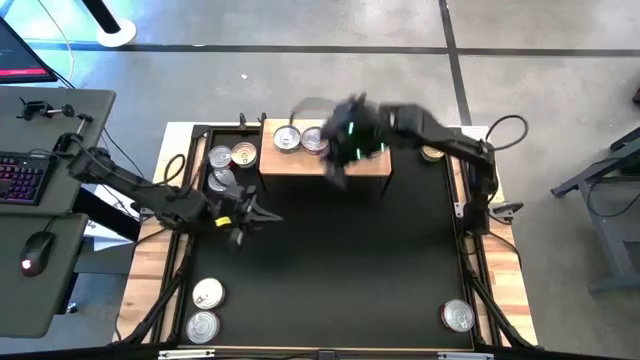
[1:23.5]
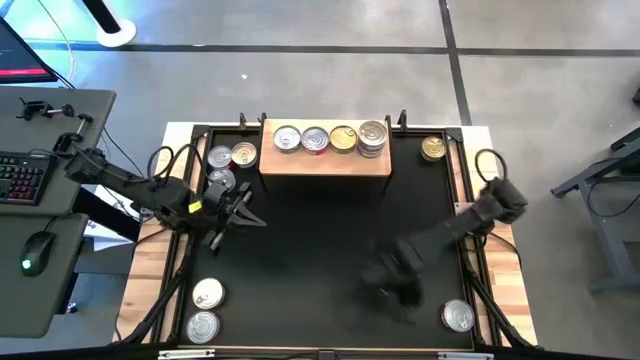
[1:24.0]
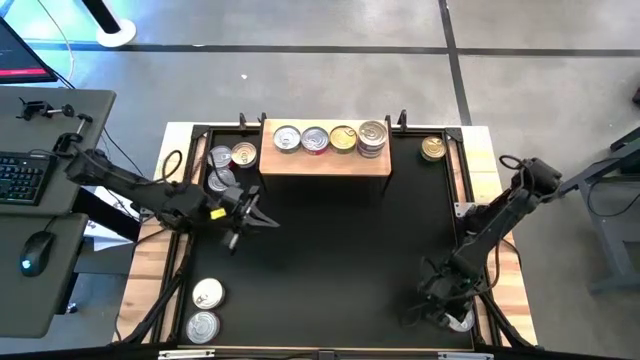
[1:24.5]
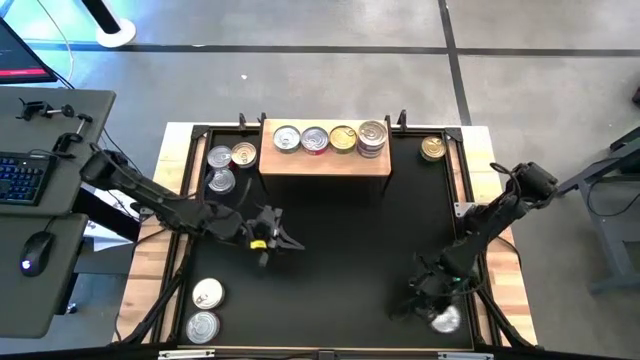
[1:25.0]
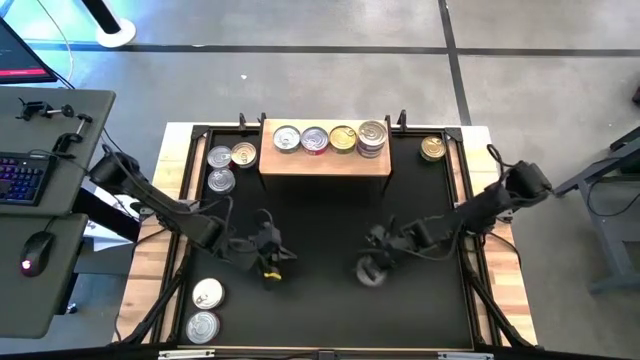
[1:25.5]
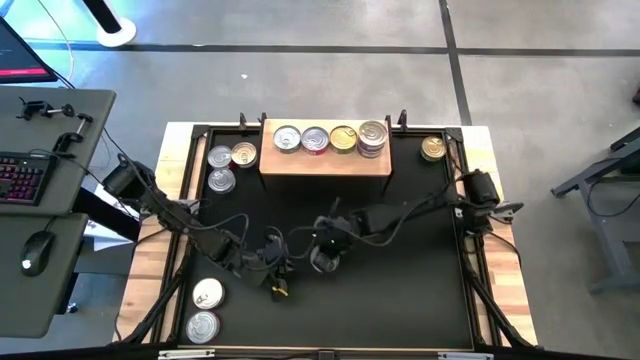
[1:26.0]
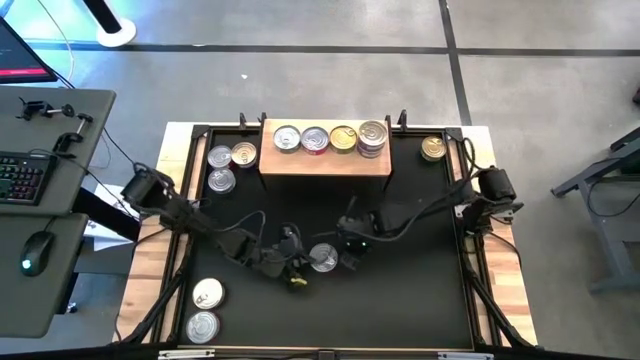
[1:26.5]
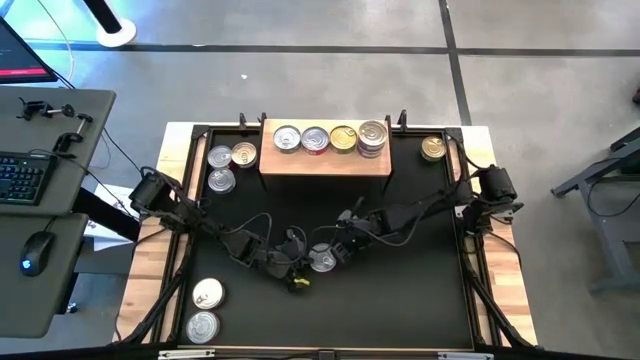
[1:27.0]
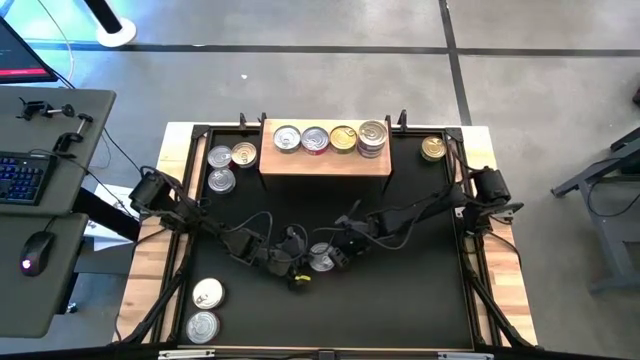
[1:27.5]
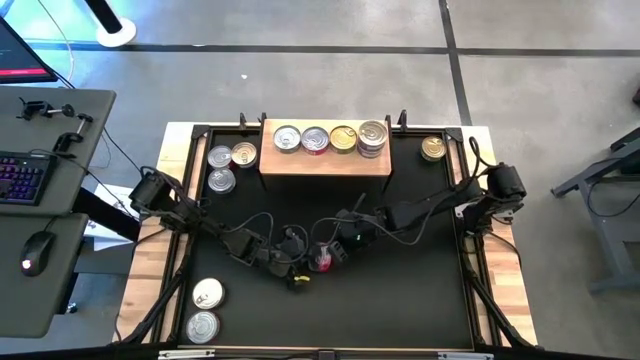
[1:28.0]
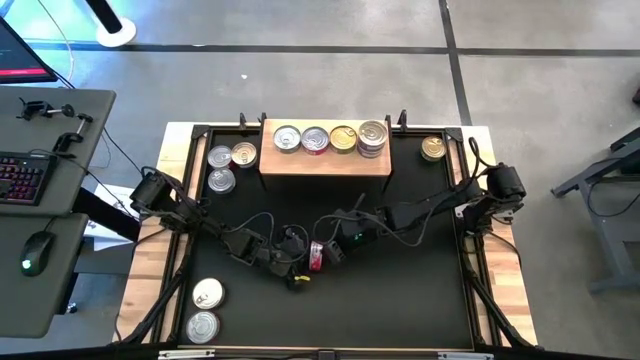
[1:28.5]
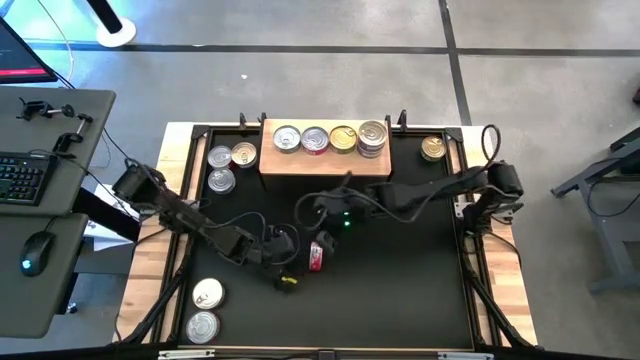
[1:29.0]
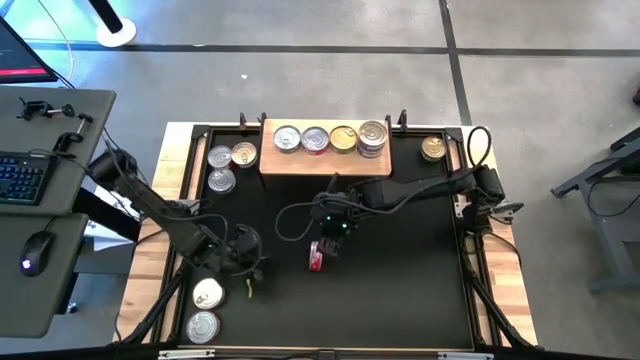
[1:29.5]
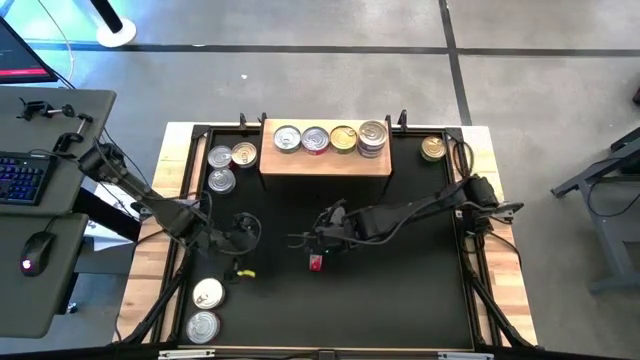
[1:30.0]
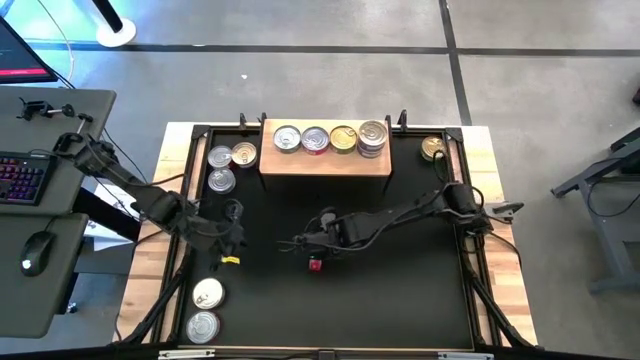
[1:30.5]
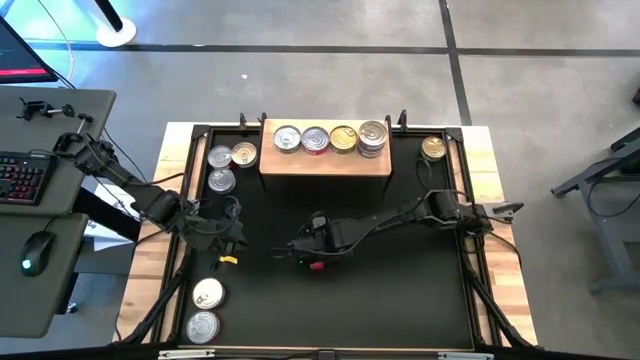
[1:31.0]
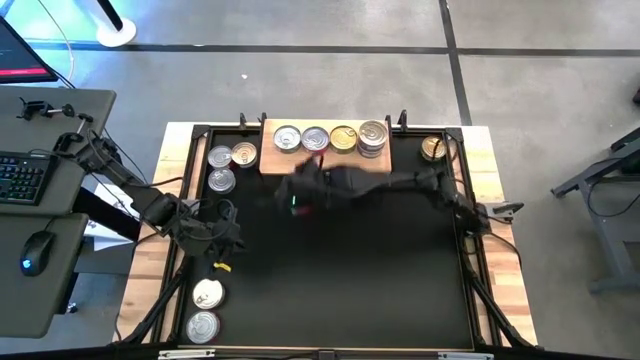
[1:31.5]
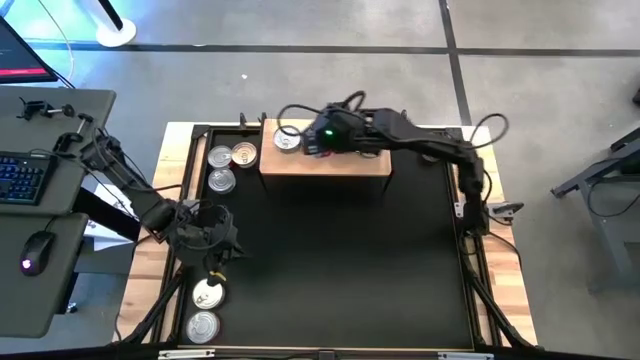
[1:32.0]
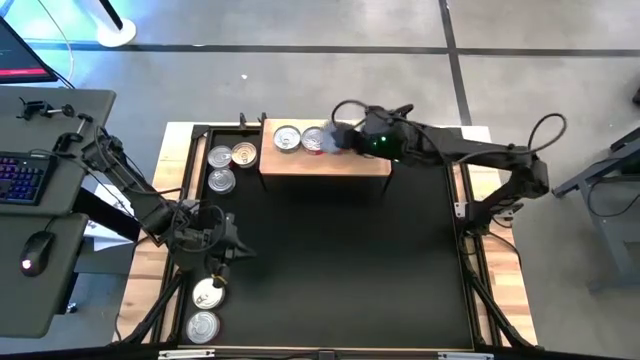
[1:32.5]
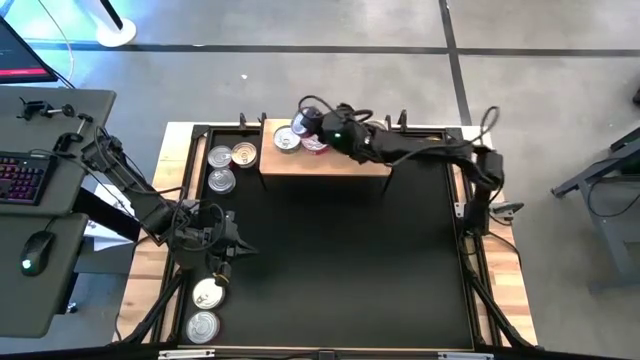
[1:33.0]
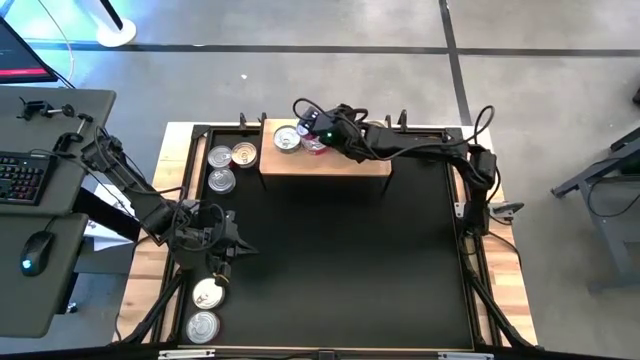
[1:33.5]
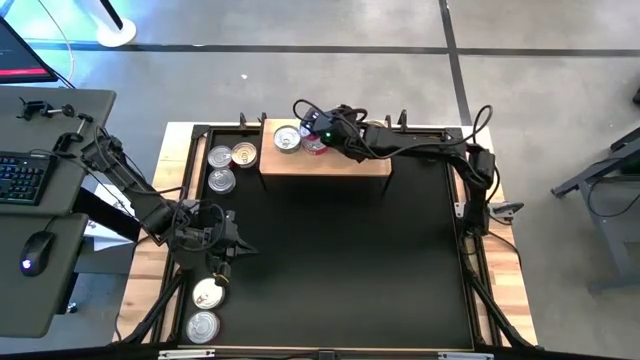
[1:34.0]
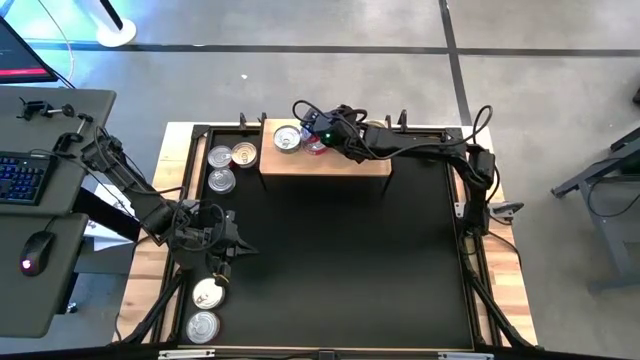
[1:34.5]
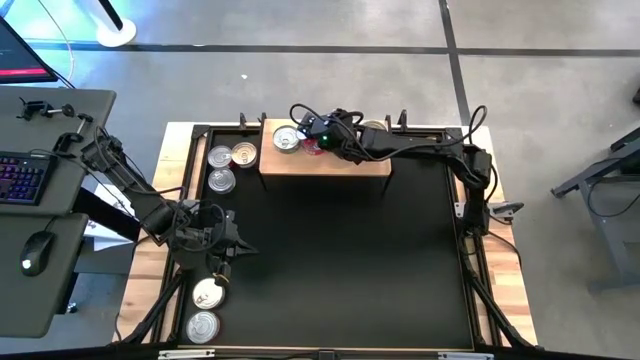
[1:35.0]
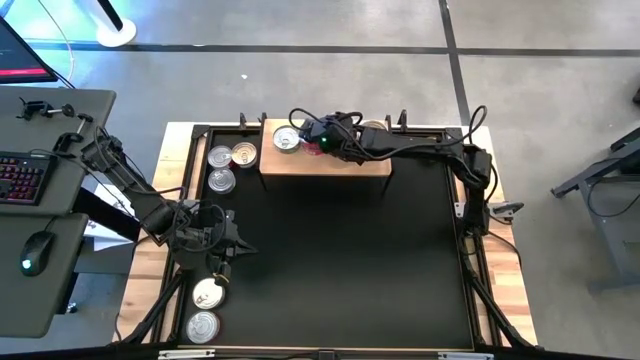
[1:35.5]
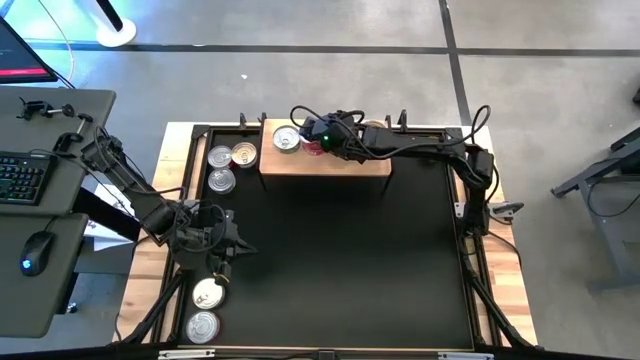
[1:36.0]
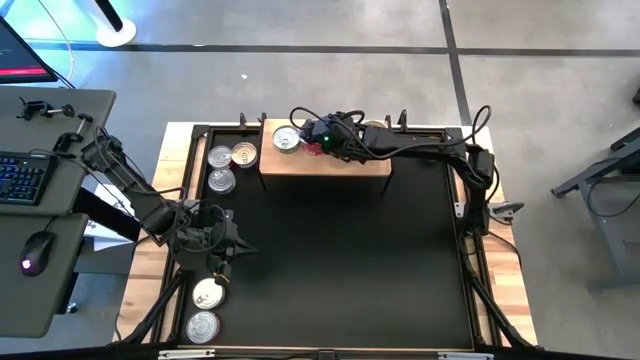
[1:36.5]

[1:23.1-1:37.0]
Task: Stack canned seafood by type on shelf
Stack the right red tuna can on top of the other red tuna can

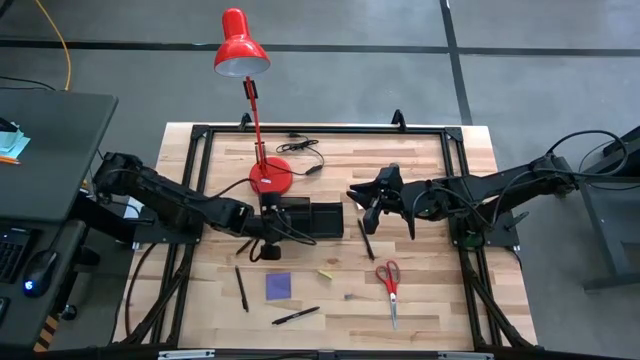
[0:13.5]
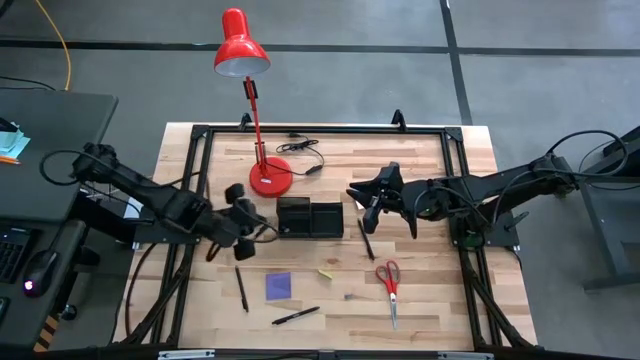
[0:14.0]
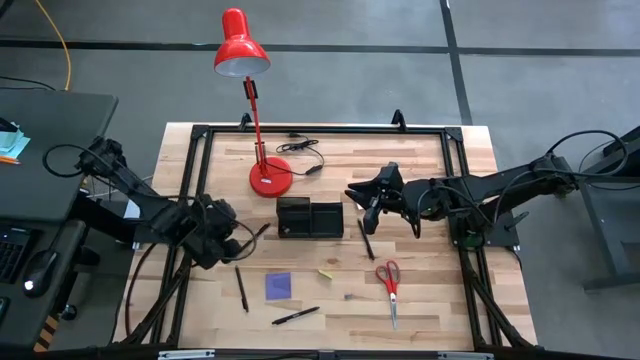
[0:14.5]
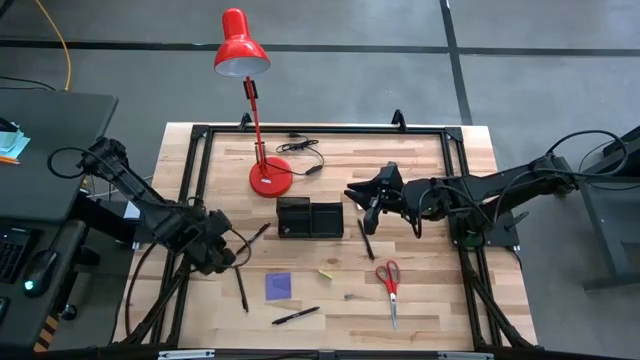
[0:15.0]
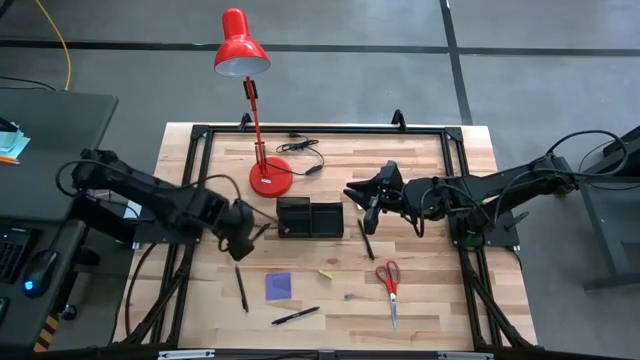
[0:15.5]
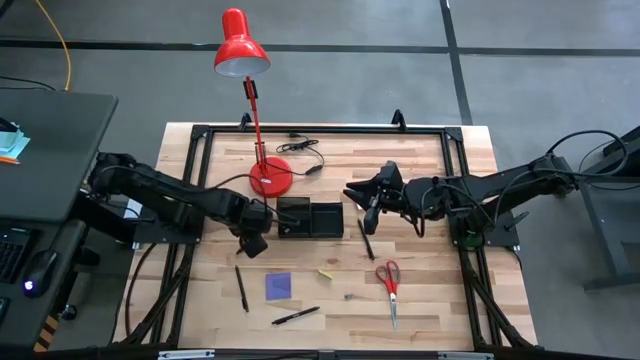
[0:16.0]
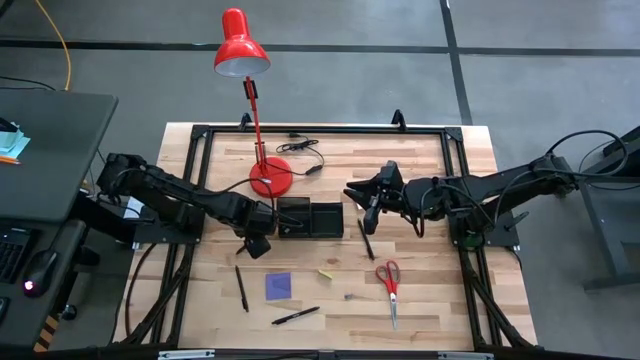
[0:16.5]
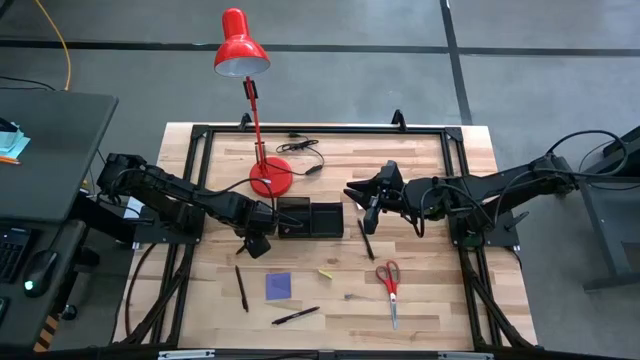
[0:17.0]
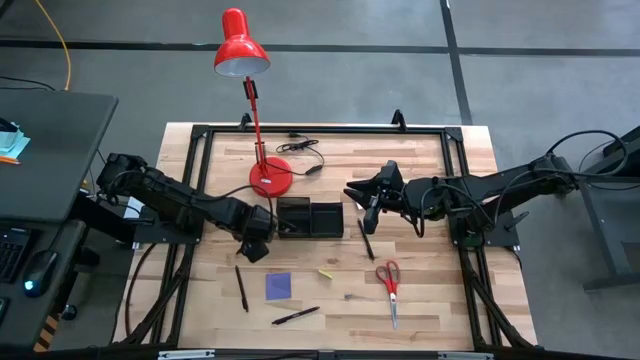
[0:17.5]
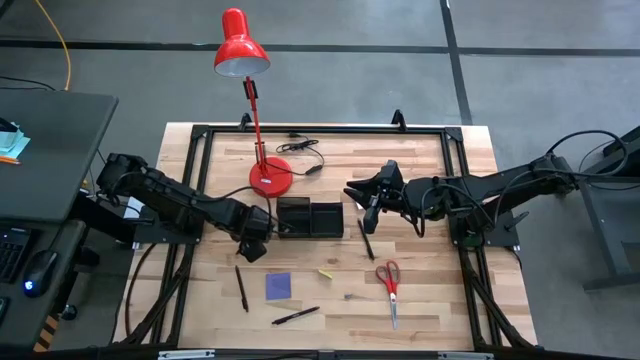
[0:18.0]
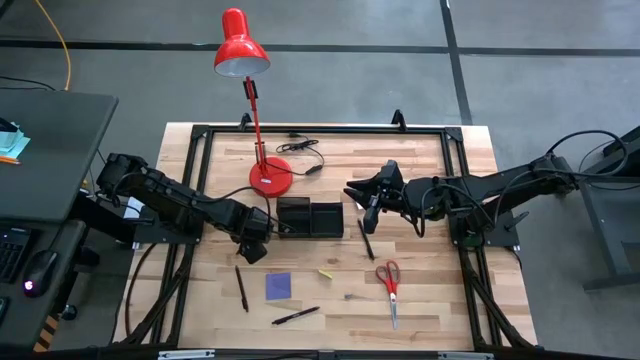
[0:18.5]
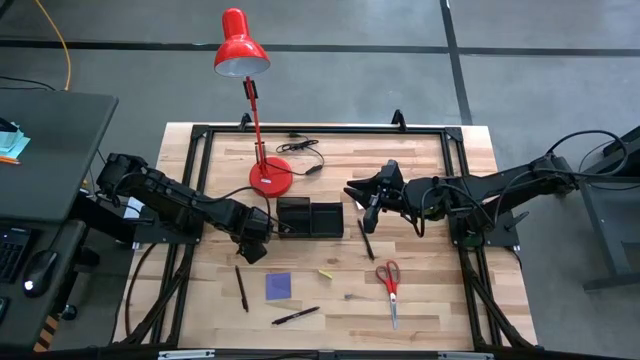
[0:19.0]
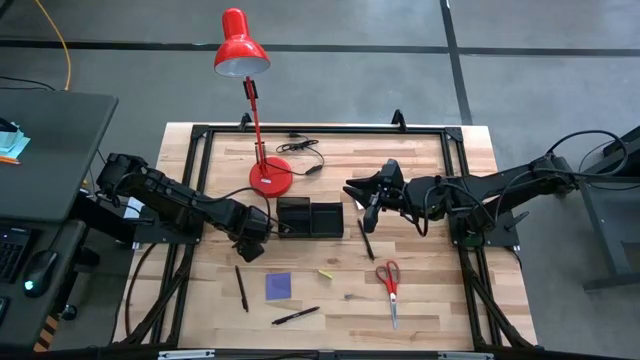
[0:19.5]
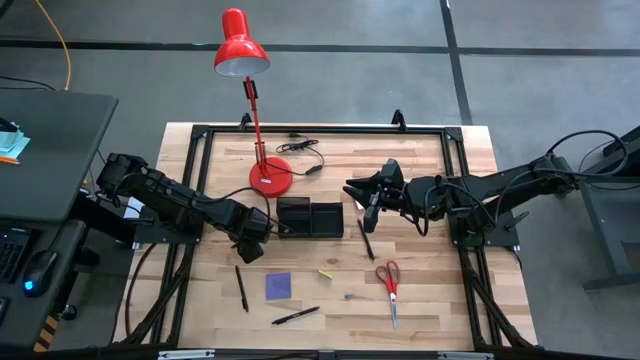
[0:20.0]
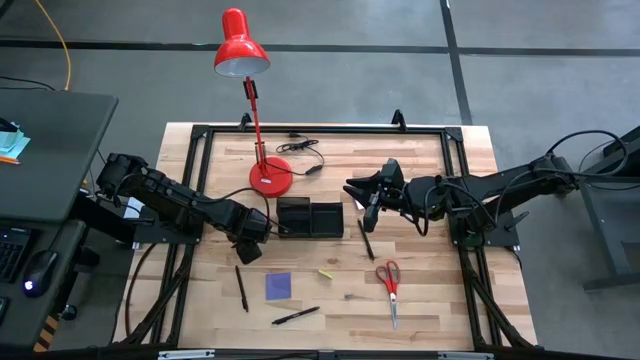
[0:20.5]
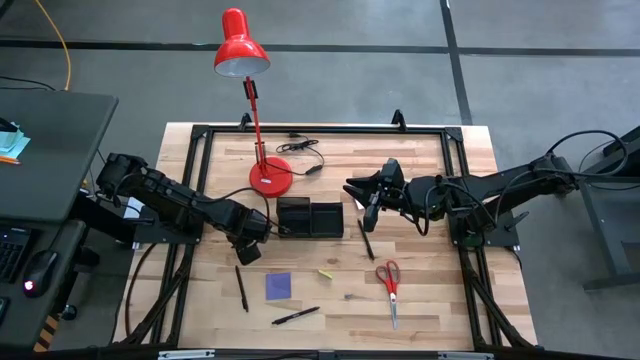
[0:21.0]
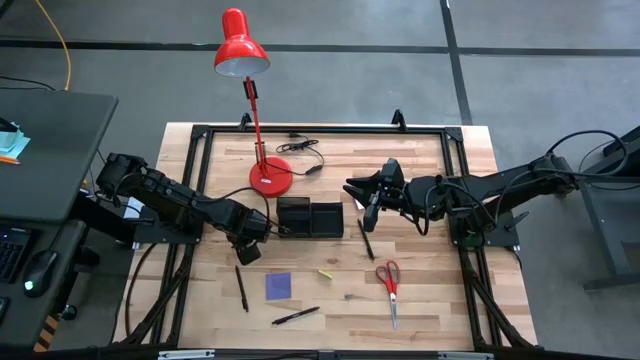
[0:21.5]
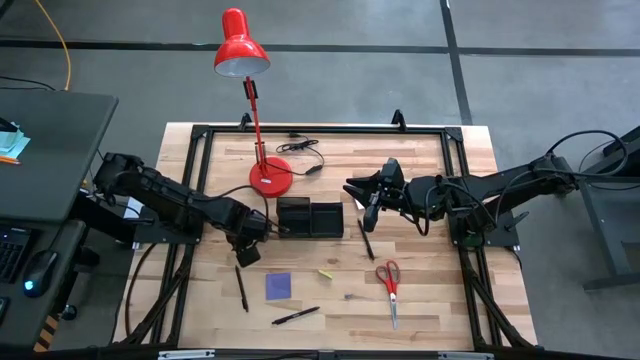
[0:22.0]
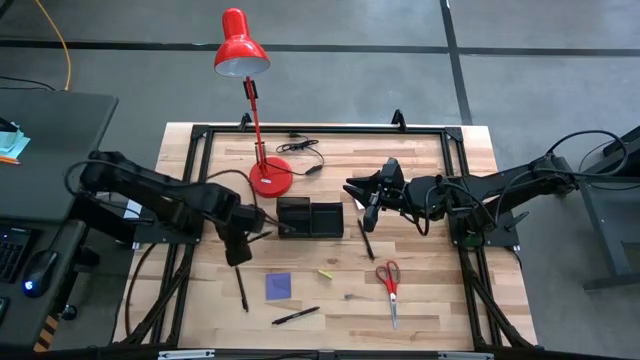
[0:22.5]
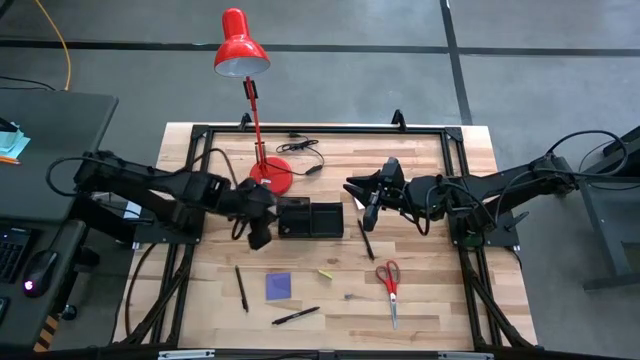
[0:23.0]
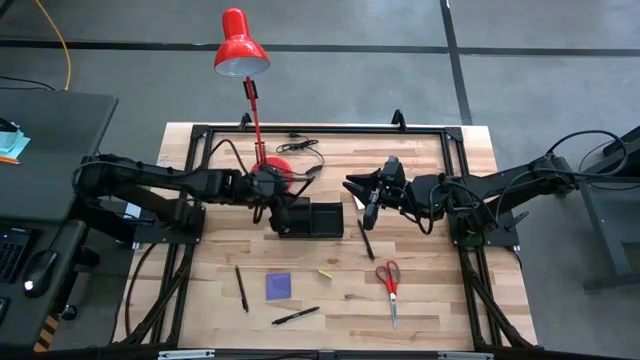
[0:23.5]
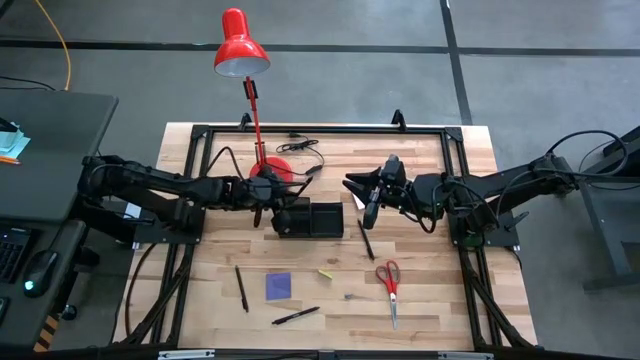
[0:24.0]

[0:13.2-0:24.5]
Task: Pick and place office supplies into organizer
Put the pen into the desk organizer
